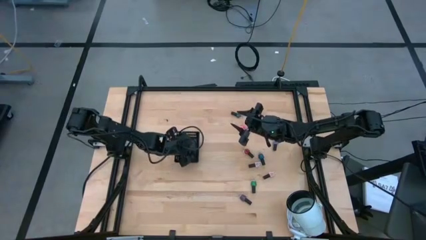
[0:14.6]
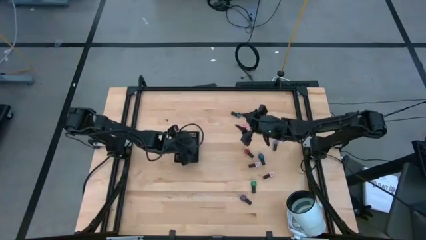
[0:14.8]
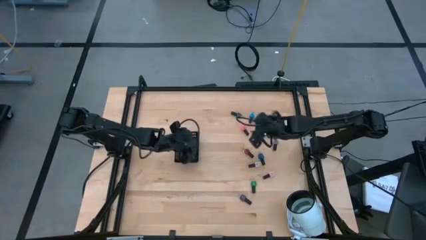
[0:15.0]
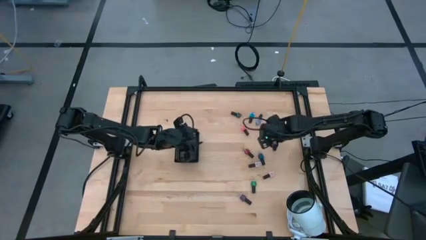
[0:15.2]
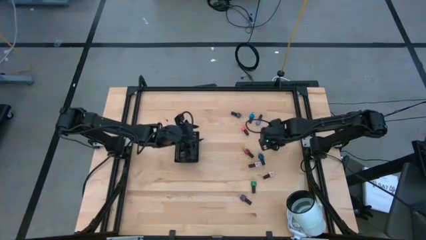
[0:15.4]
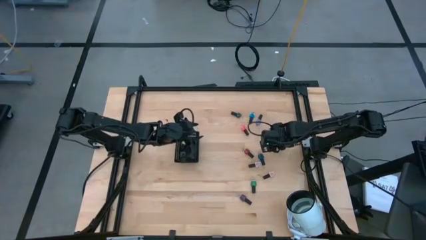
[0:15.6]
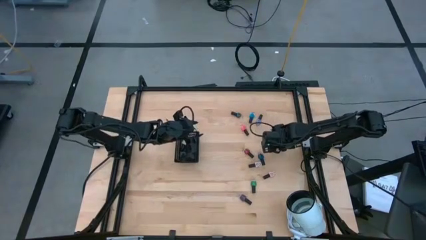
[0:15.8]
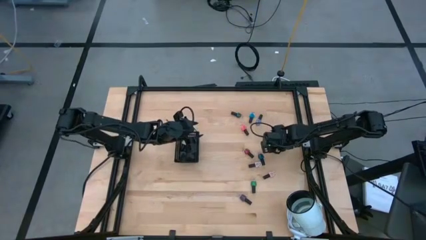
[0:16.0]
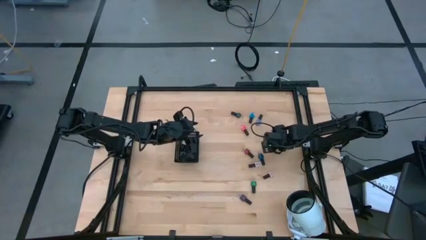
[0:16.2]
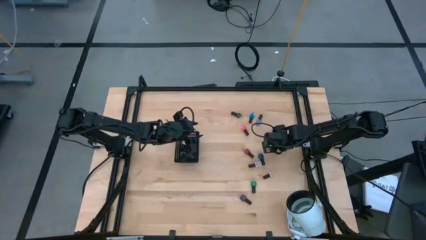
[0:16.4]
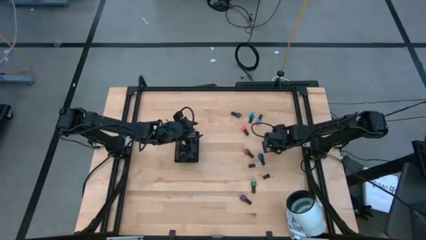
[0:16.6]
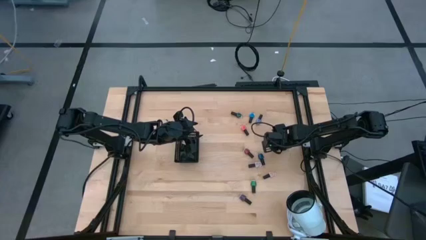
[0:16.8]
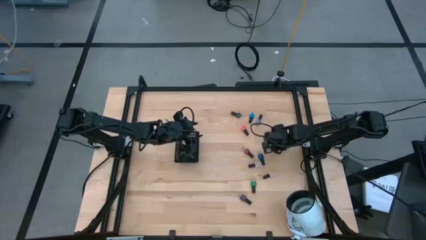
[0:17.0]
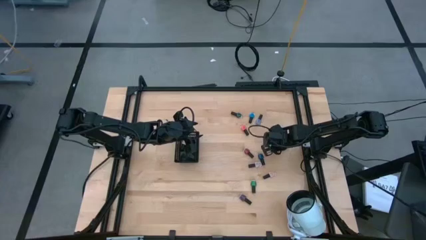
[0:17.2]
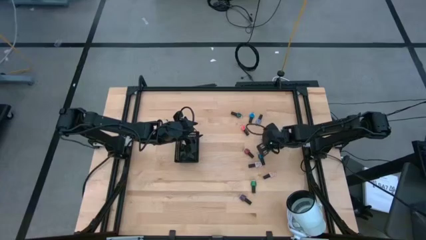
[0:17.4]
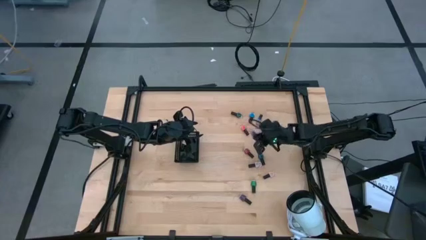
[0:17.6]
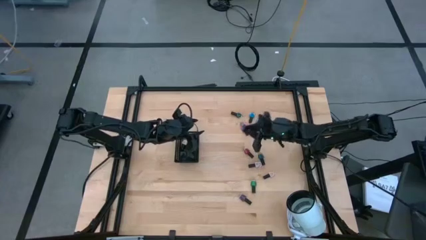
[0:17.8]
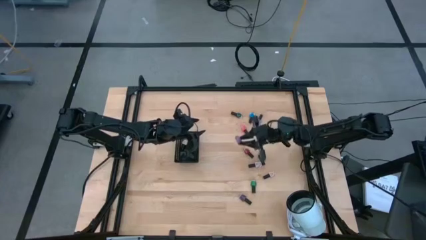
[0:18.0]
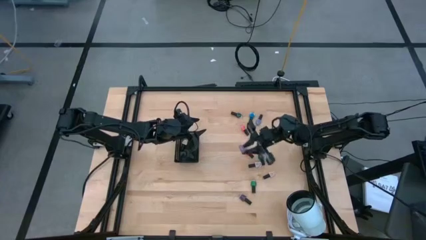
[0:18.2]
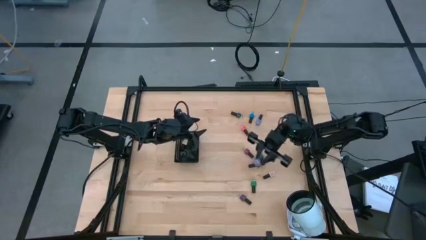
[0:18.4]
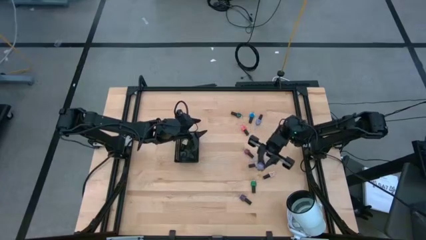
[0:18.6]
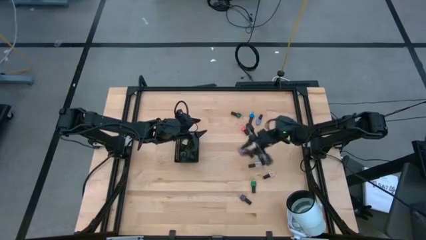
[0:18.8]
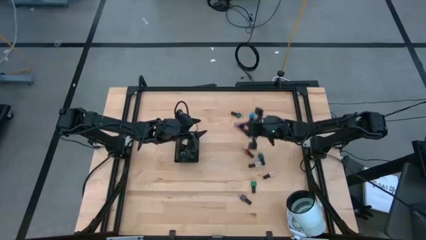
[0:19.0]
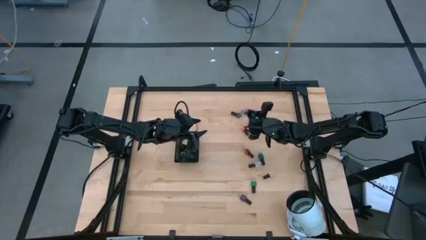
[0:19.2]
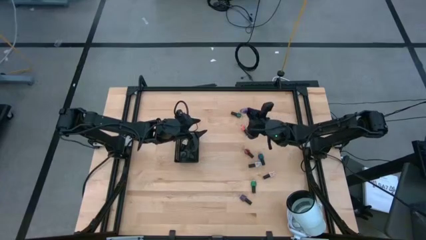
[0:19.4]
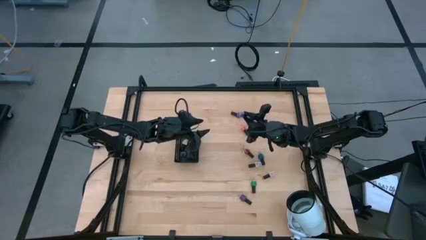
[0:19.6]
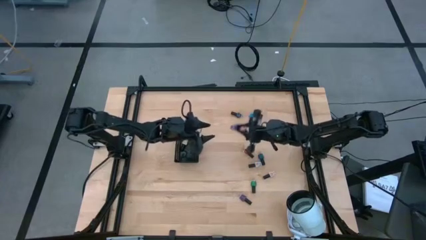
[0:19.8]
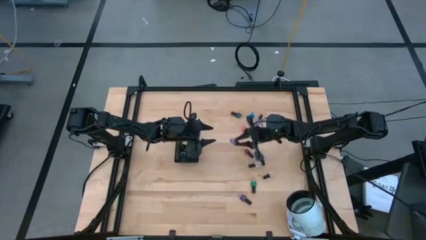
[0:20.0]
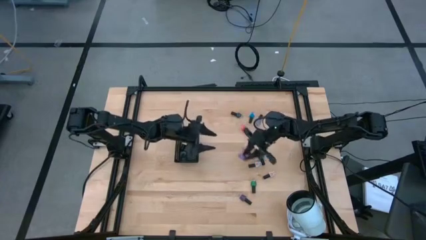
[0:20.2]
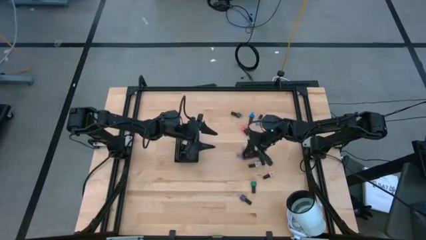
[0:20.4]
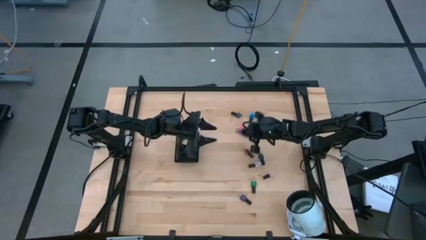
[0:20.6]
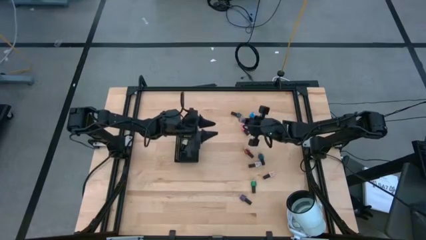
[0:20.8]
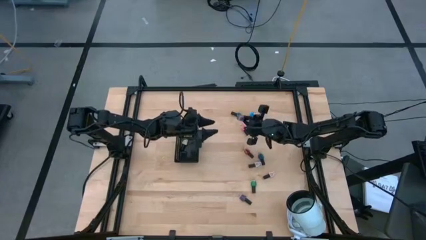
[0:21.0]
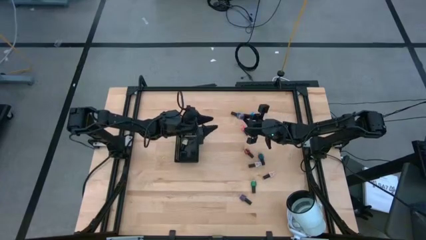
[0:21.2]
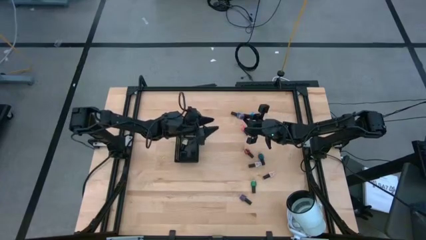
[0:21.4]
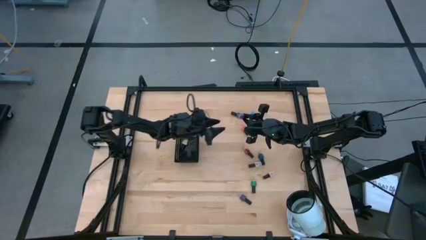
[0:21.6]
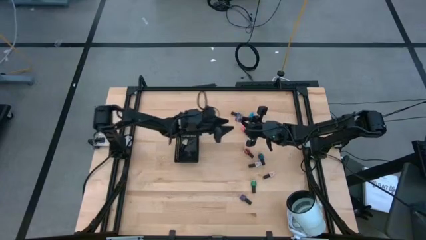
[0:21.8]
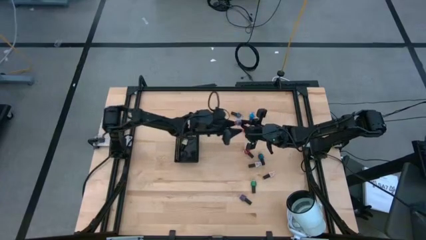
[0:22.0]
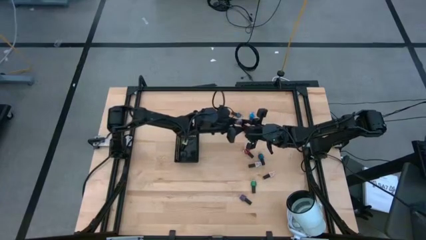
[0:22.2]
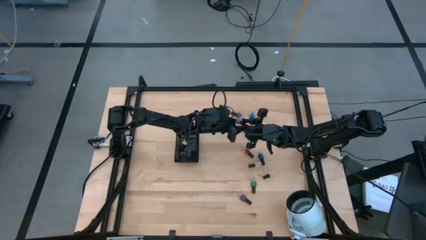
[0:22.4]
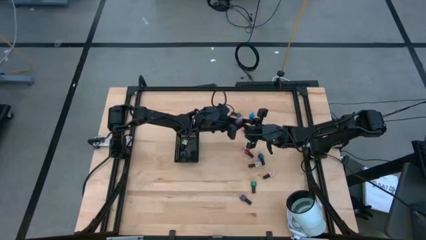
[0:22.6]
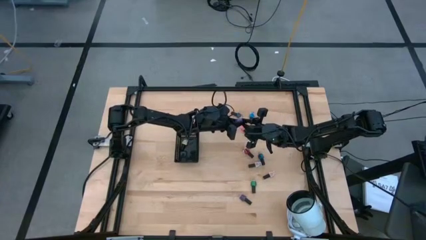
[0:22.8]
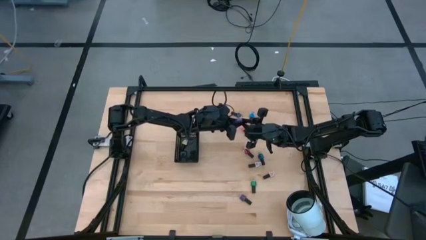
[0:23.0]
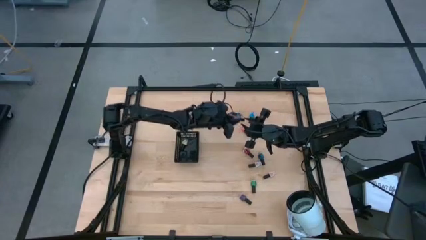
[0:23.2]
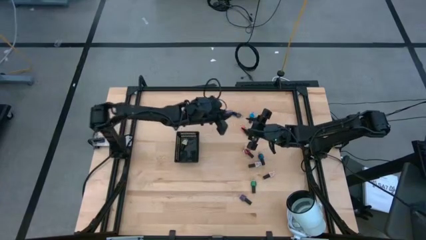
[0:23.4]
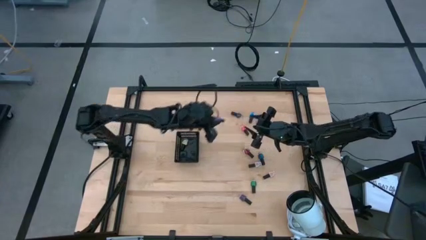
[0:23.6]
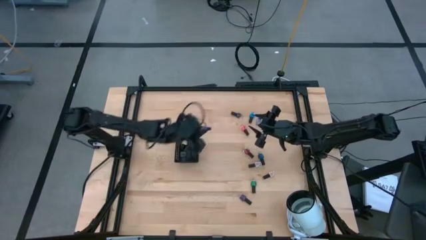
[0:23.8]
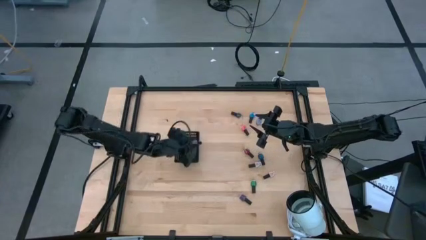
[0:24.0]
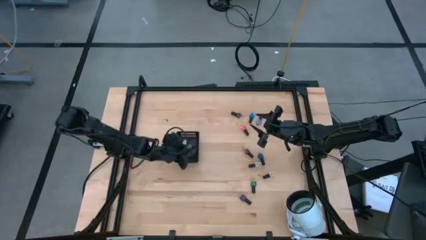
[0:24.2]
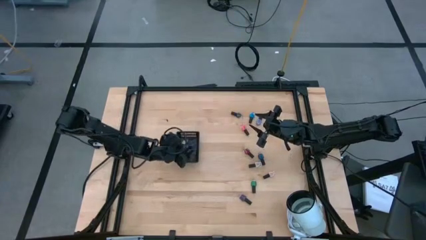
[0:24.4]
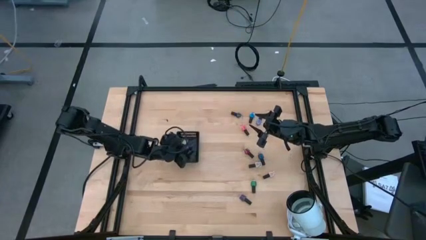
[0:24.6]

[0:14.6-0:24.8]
Task: Pick & Place Nail Polish
Put the light violet nail polish into the basket

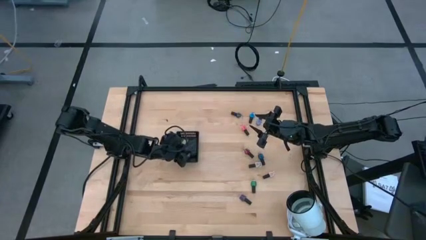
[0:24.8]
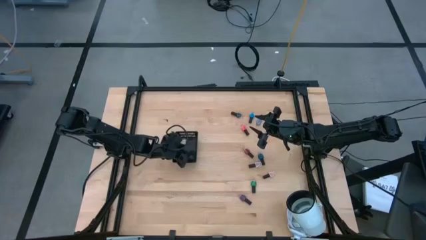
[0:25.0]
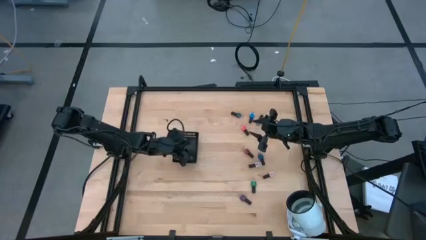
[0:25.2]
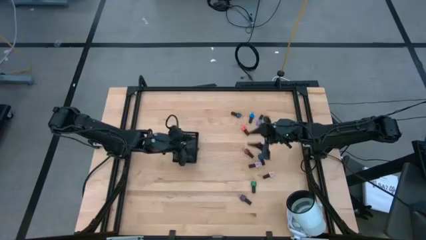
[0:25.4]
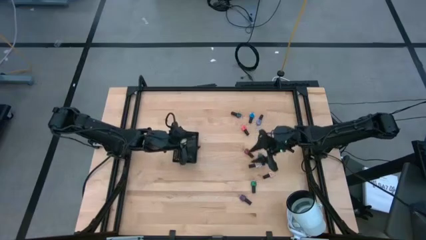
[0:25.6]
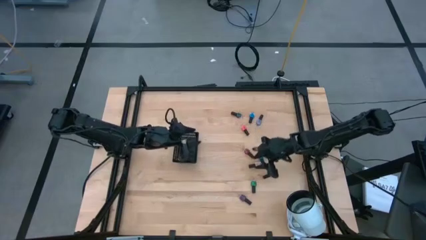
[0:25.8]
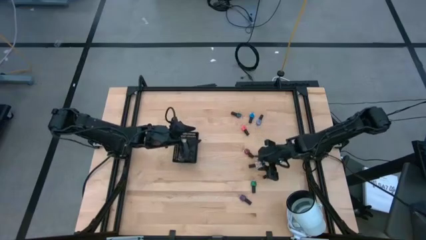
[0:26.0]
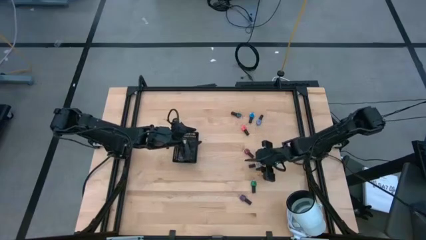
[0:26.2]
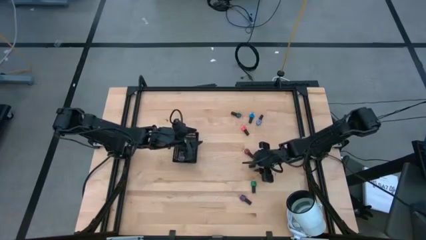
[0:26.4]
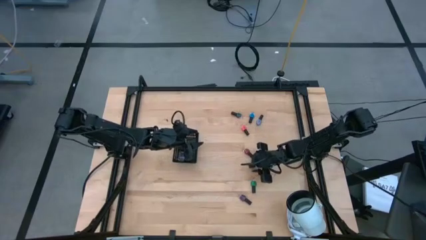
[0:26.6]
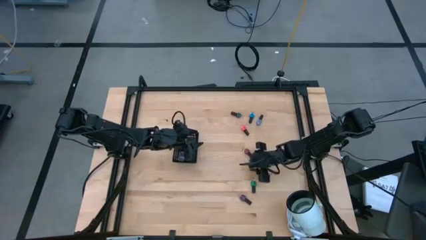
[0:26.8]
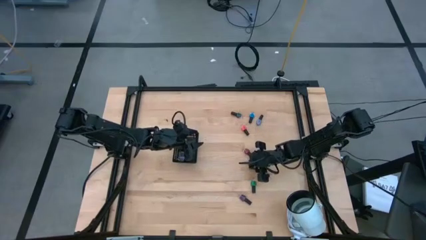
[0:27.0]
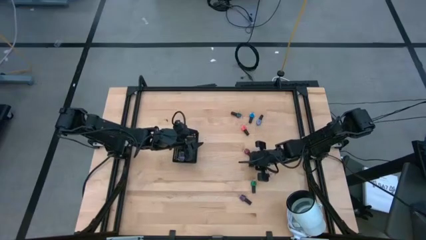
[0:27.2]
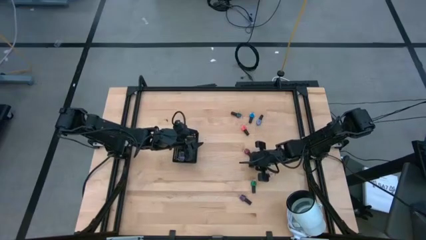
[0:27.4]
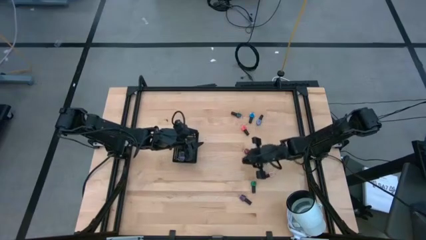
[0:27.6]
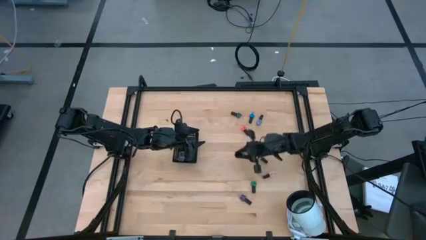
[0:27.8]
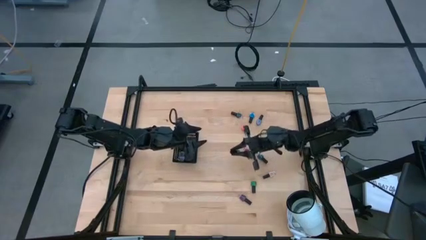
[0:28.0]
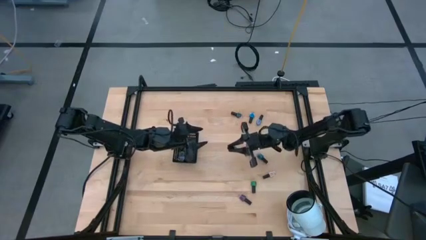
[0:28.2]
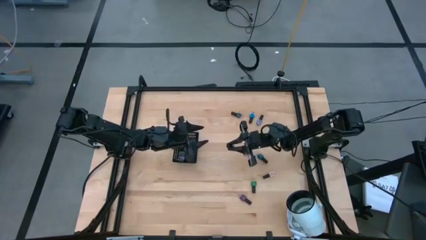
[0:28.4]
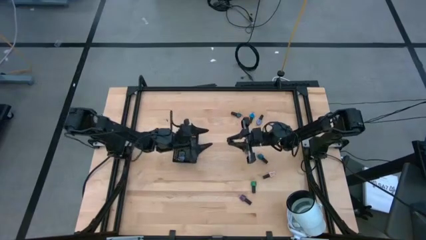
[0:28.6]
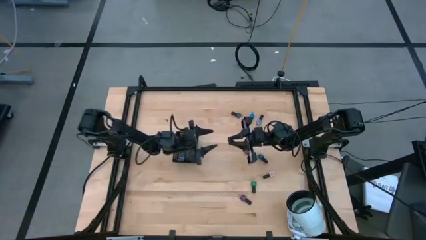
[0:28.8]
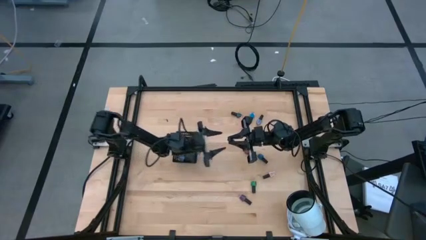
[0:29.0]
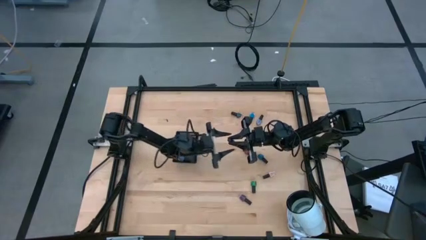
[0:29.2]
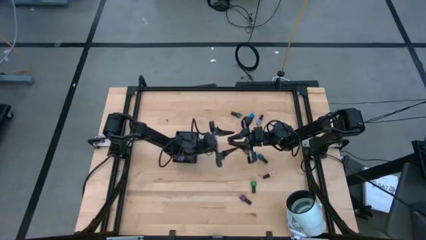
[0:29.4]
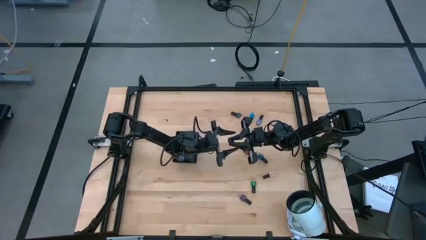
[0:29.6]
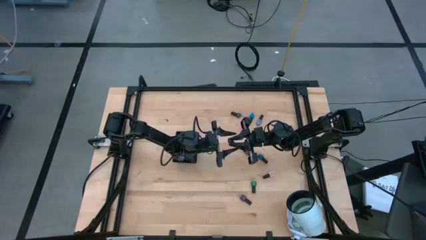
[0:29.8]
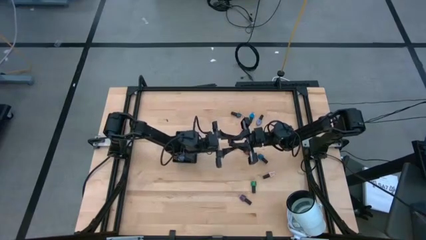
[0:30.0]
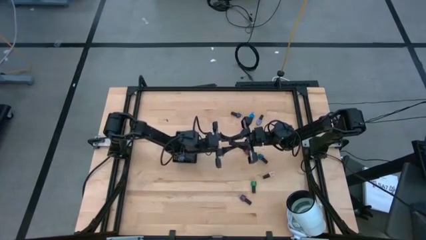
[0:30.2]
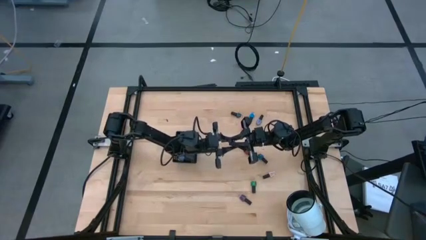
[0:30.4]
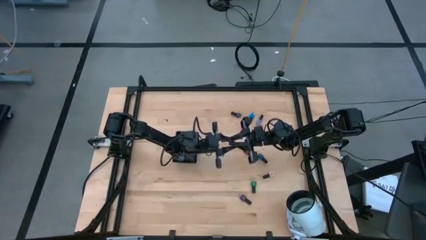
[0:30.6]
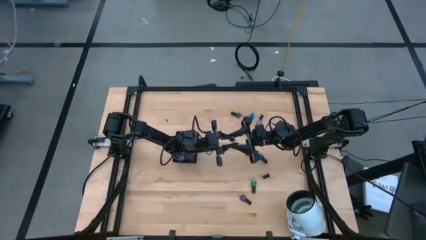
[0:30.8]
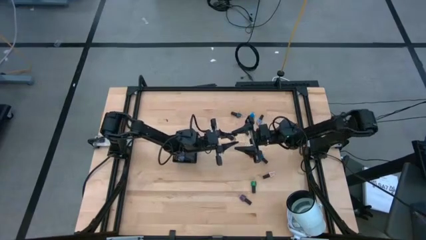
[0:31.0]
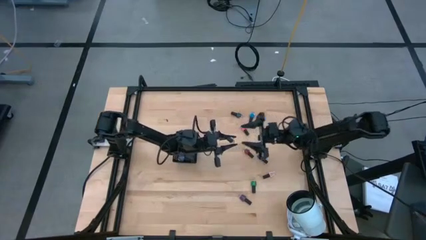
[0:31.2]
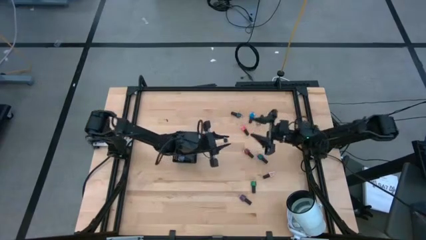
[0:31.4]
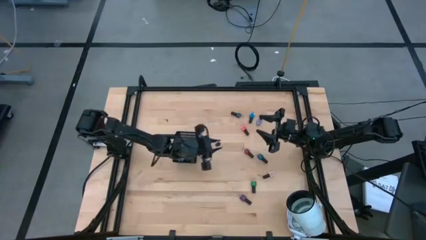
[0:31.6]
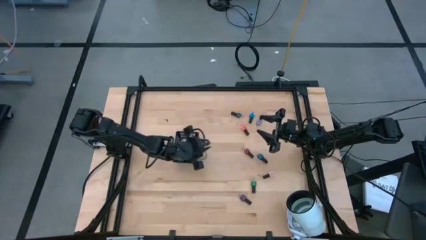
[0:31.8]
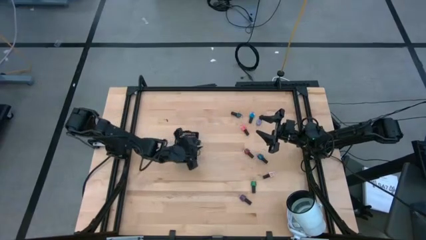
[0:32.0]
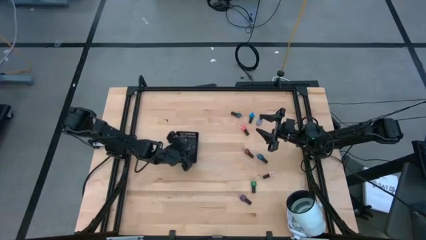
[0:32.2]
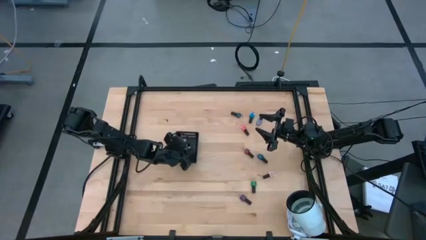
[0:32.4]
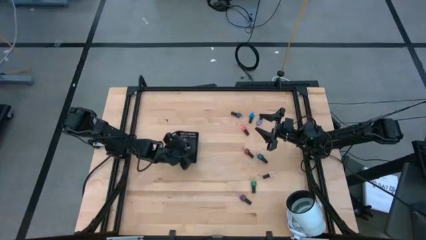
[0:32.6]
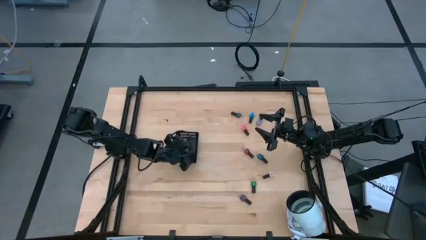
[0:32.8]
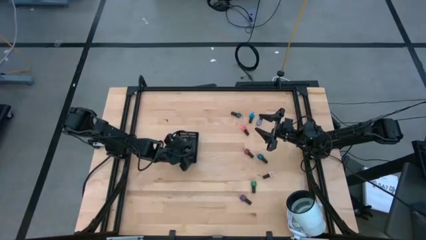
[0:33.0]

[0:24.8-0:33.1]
Put the white nail polish into the basket
